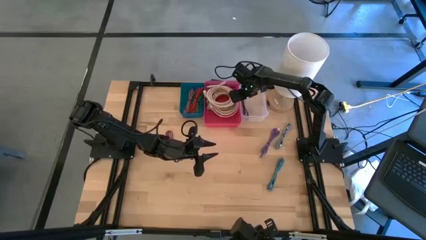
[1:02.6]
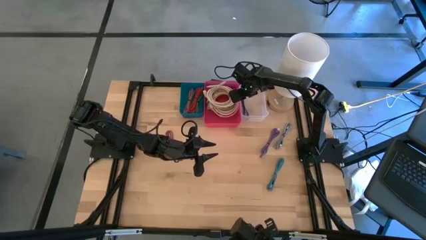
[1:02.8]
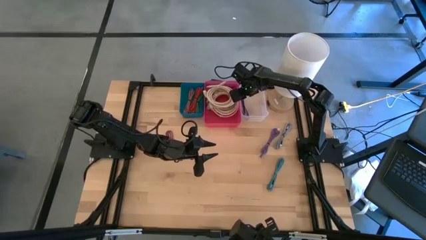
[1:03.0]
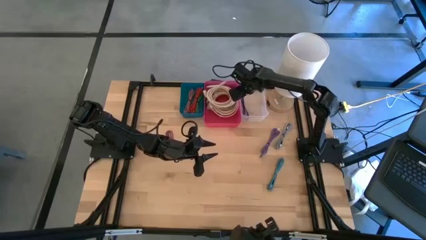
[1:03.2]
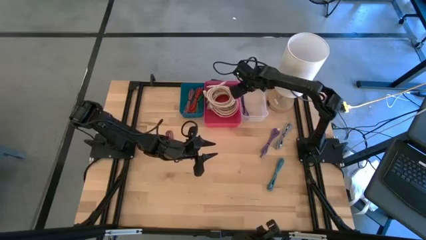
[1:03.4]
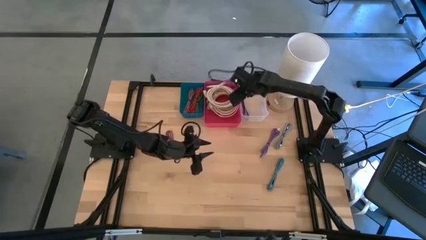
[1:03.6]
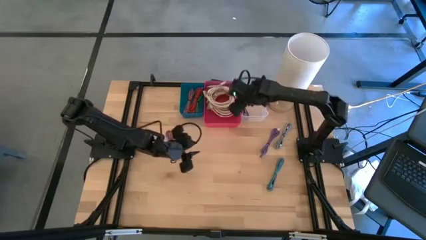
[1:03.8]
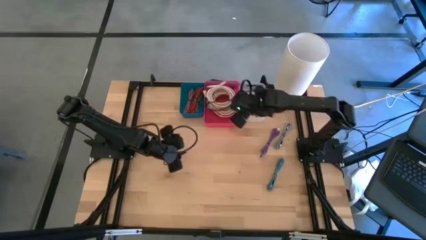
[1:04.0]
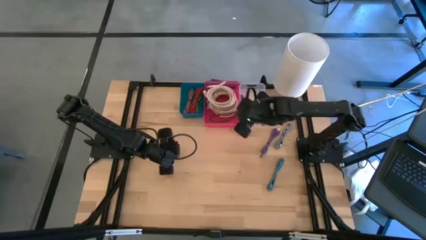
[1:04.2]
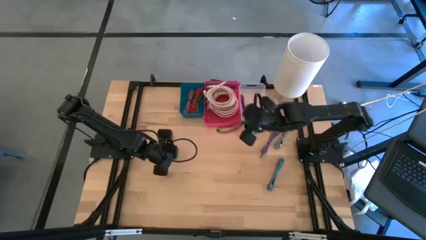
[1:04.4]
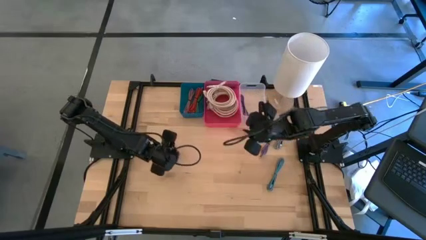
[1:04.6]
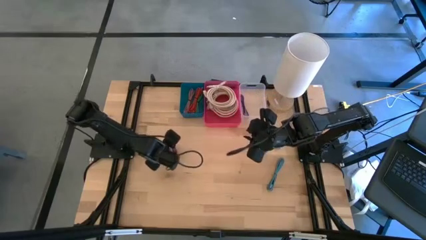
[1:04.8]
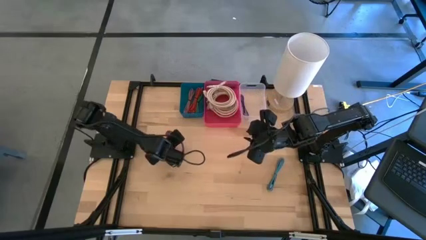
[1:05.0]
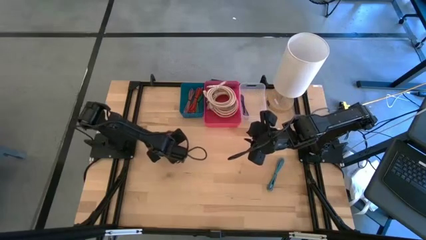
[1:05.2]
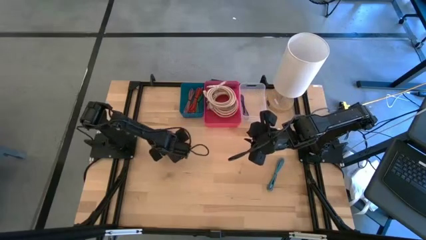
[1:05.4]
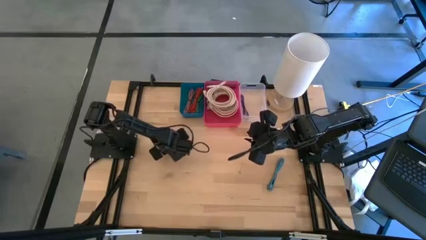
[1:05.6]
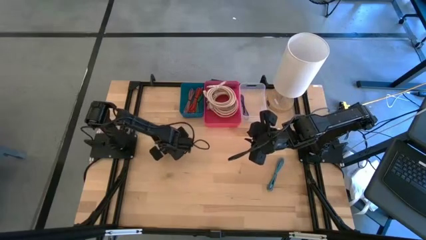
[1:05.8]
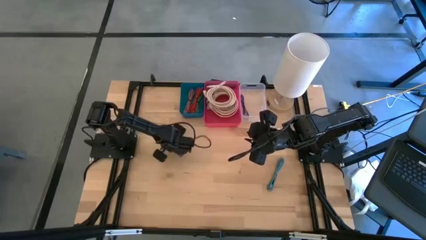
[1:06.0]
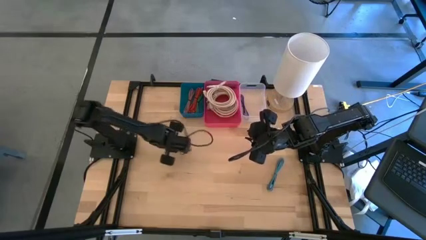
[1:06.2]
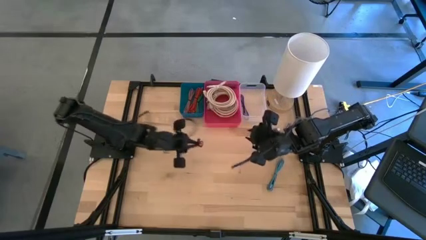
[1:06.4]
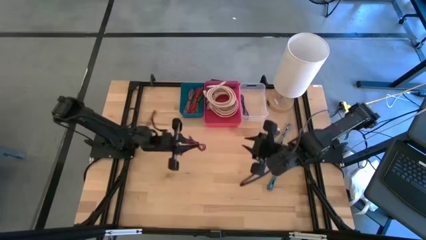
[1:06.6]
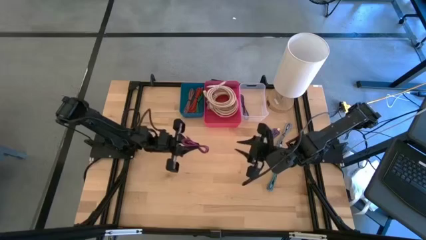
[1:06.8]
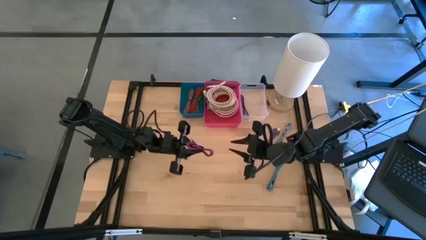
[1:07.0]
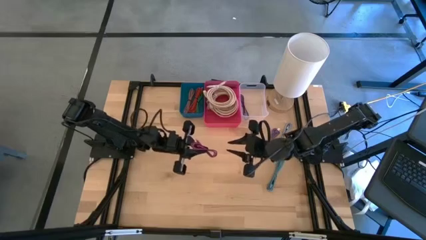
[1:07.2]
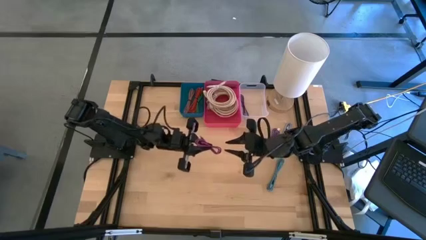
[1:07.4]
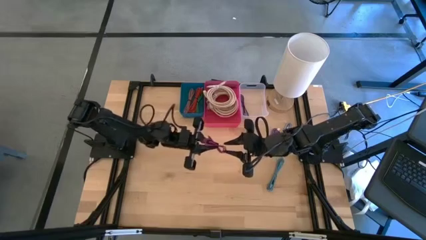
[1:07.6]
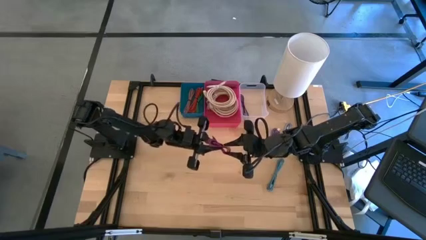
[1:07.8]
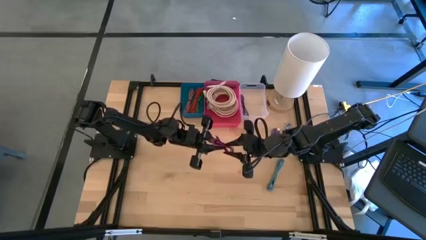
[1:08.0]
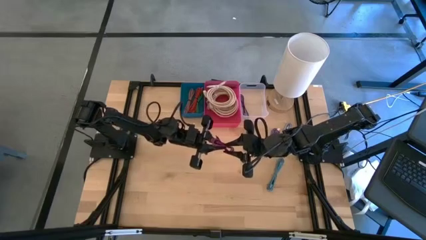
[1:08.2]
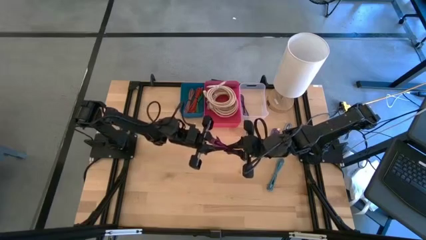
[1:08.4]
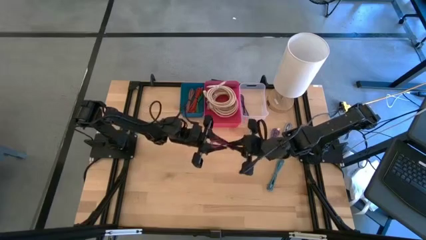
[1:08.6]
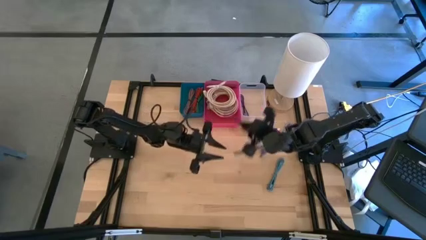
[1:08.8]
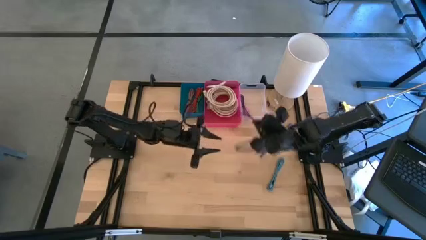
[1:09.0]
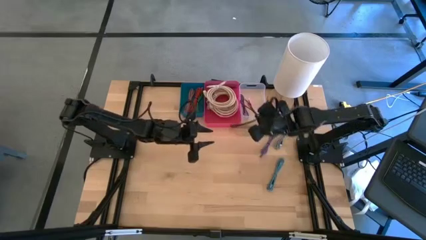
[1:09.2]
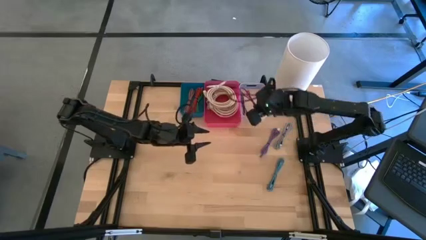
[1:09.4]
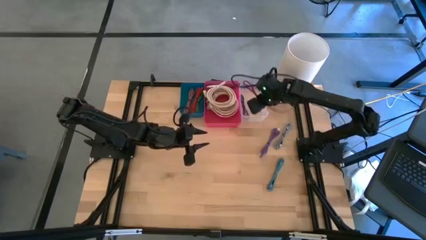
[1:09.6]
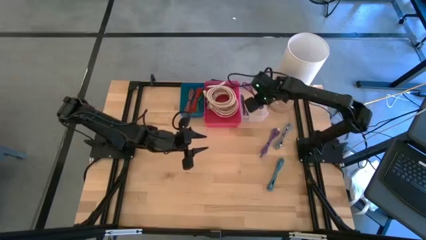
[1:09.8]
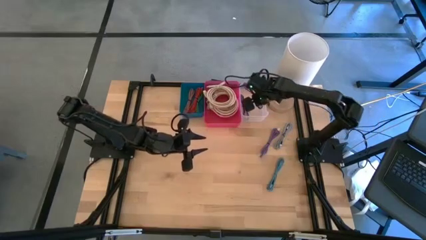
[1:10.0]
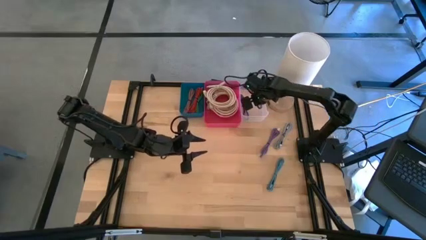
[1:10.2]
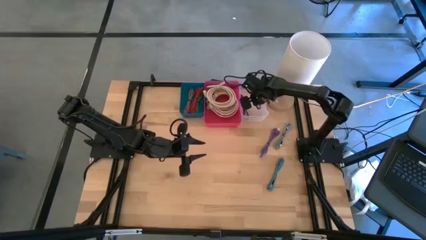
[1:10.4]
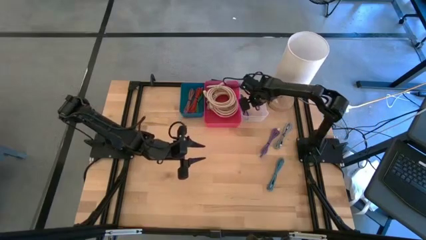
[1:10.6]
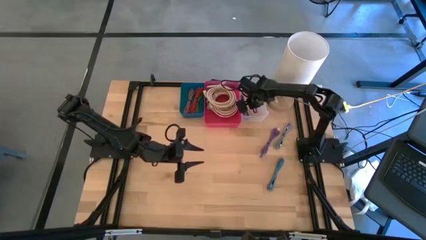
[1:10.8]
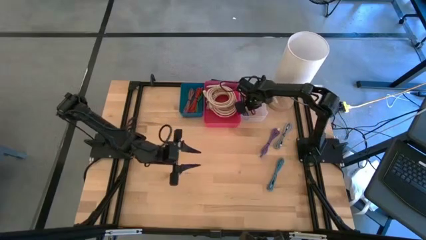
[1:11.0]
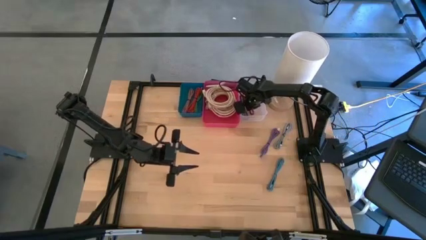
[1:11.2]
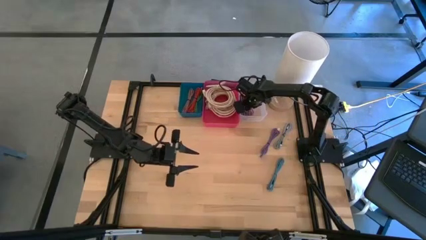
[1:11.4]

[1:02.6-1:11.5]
Task: Pick & Place USB Port
Put the pink patterned charger cable into the transparent bin

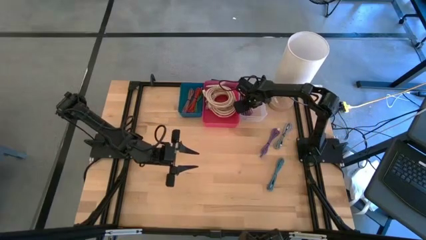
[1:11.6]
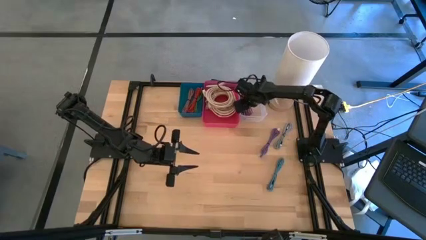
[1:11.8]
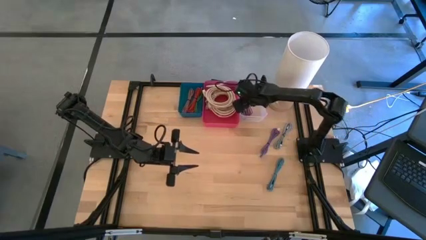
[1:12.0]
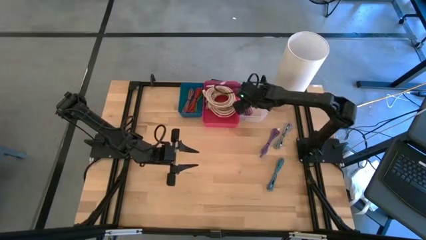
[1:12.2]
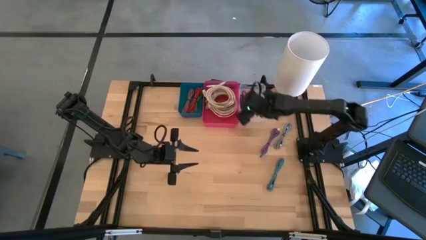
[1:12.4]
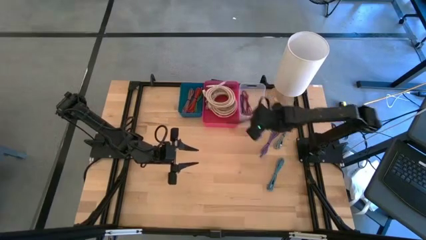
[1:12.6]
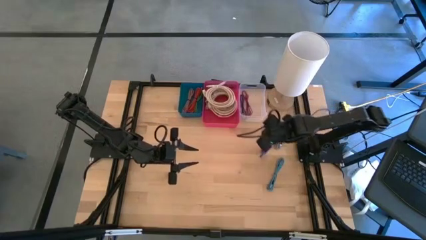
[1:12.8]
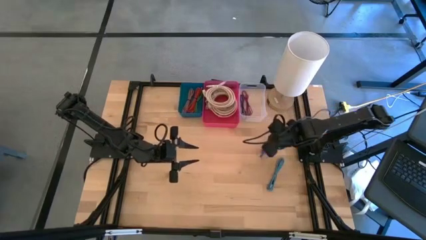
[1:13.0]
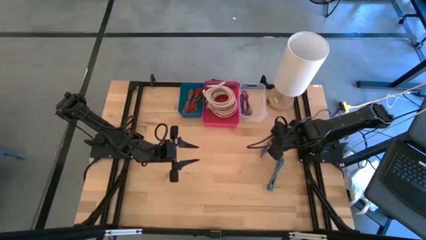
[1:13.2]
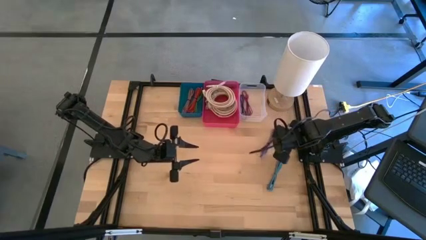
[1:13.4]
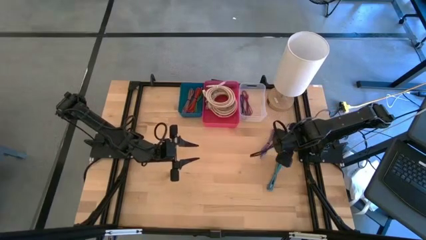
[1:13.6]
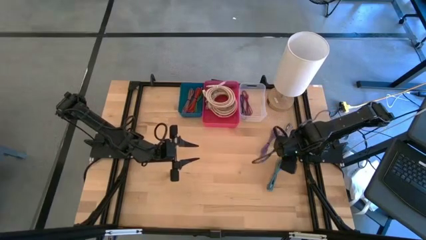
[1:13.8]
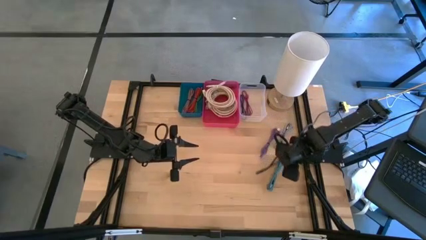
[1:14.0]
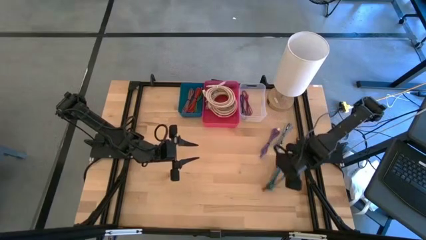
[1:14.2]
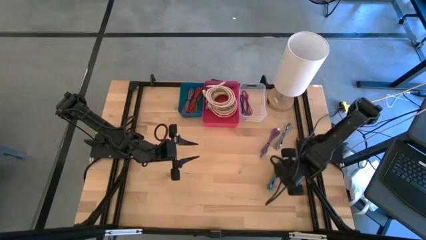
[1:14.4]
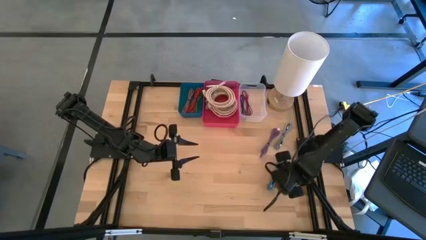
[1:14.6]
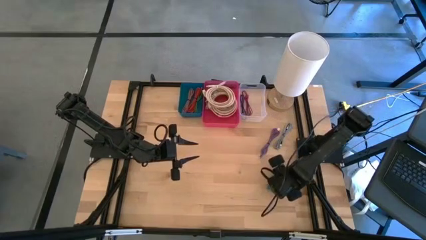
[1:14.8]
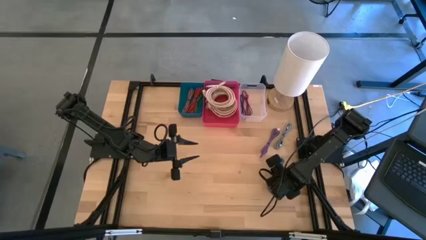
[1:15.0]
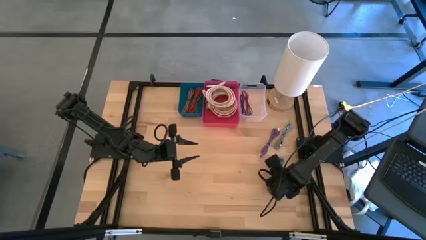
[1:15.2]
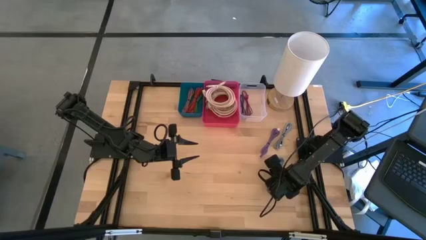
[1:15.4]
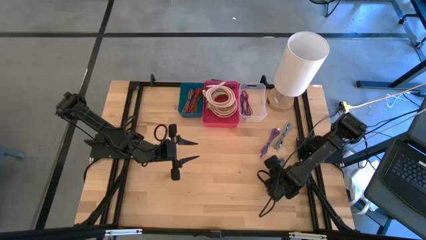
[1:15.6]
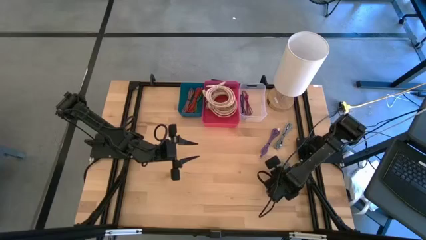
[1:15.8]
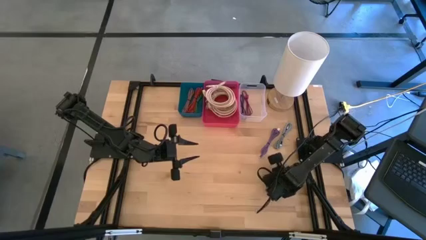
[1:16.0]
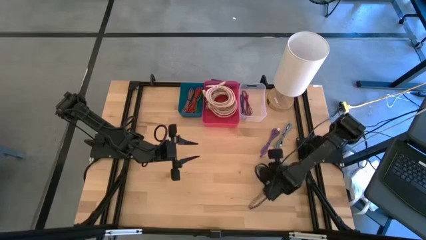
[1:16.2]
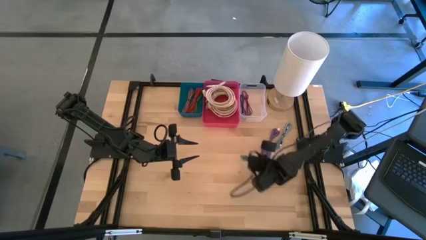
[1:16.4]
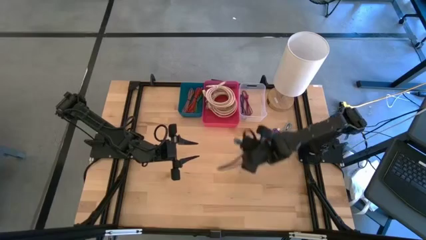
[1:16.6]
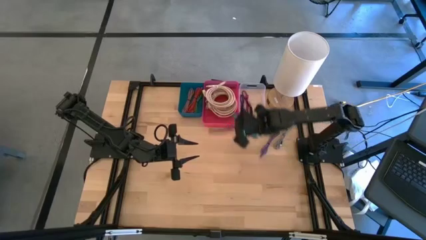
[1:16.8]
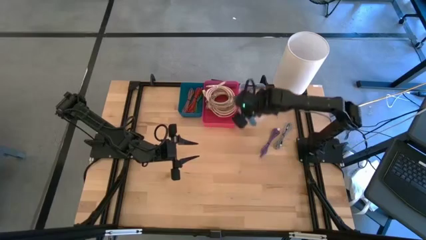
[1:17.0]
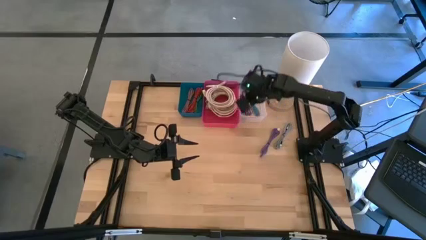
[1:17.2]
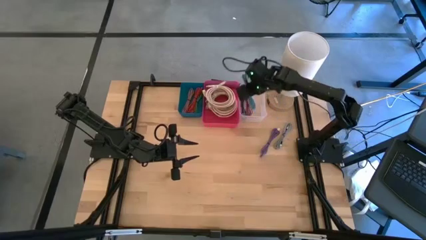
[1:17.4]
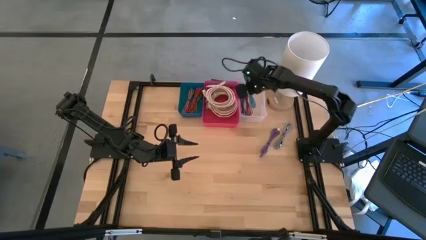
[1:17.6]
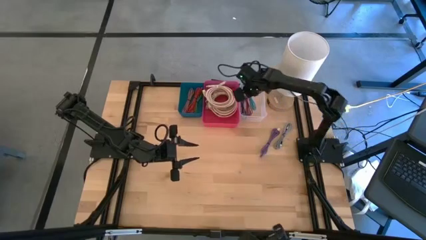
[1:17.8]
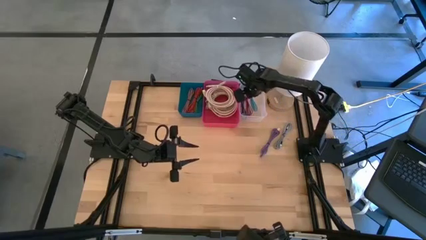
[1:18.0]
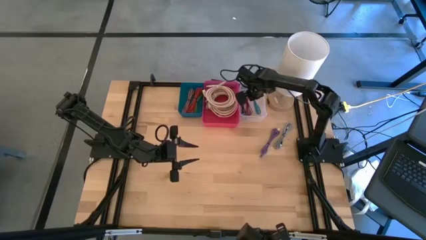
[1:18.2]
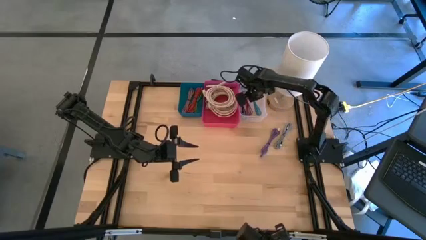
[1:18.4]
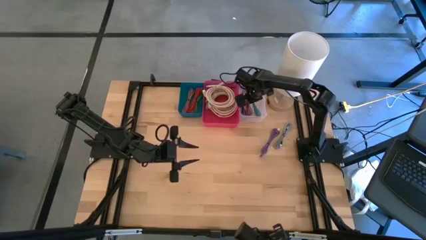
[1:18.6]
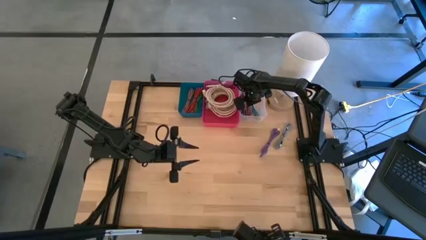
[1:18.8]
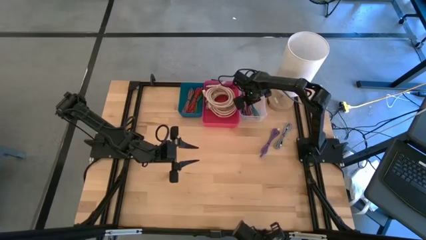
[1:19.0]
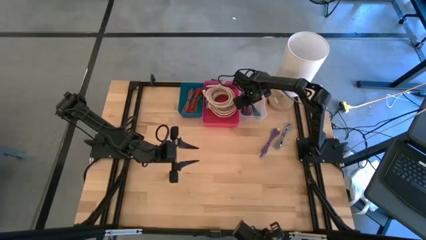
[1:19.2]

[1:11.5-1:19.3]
Put the blue patterned charger cable into the transparent bin
